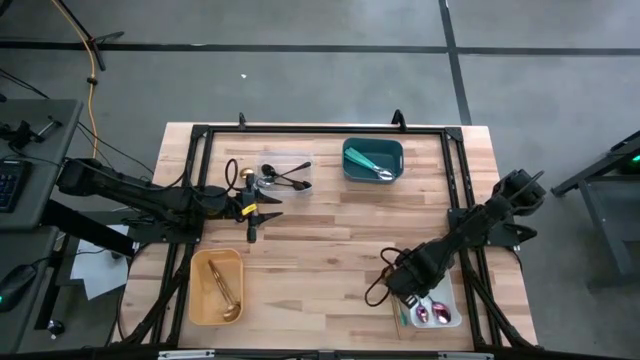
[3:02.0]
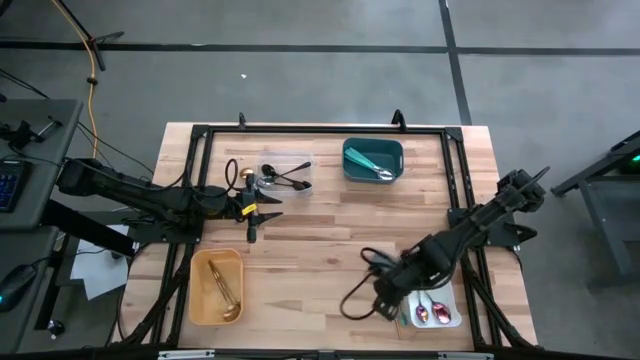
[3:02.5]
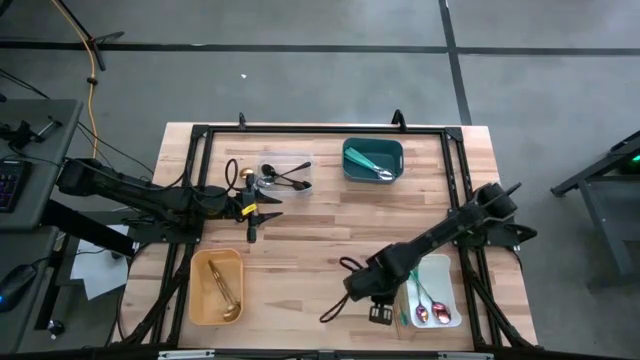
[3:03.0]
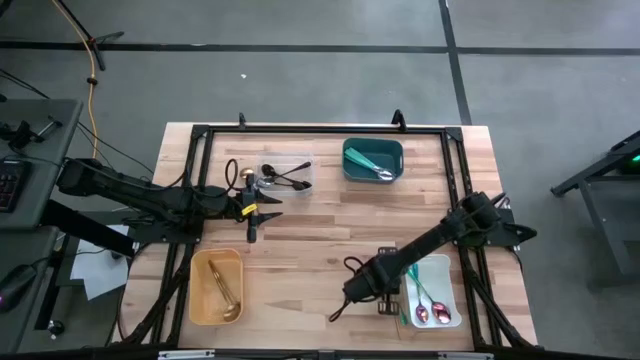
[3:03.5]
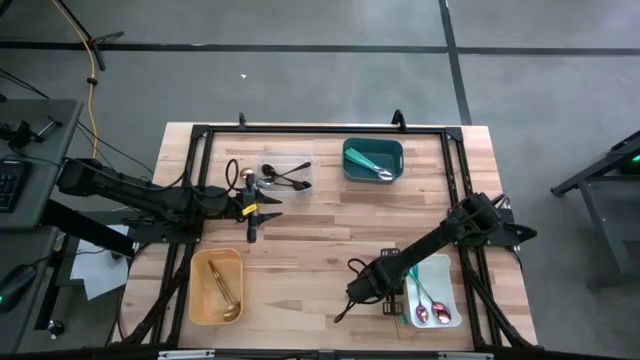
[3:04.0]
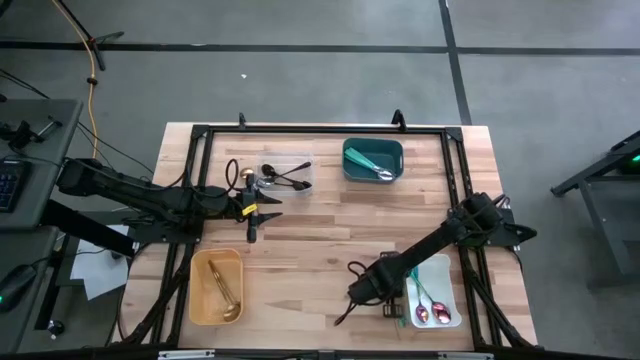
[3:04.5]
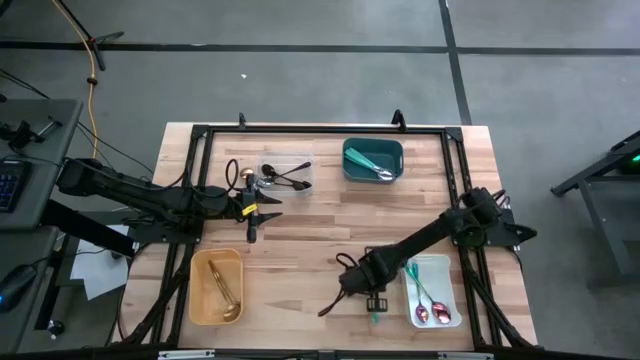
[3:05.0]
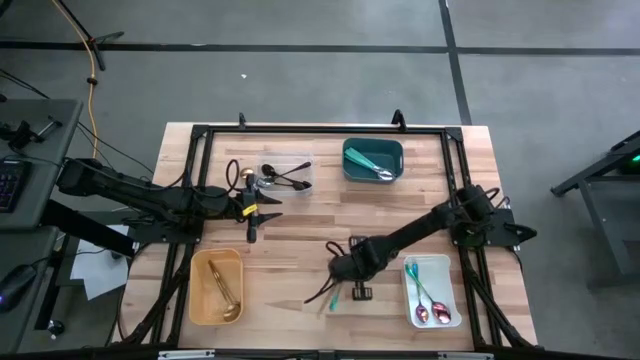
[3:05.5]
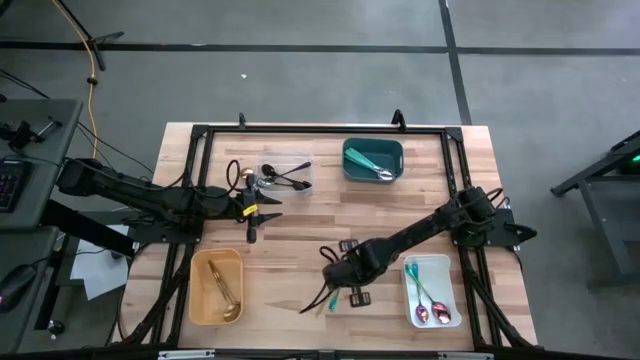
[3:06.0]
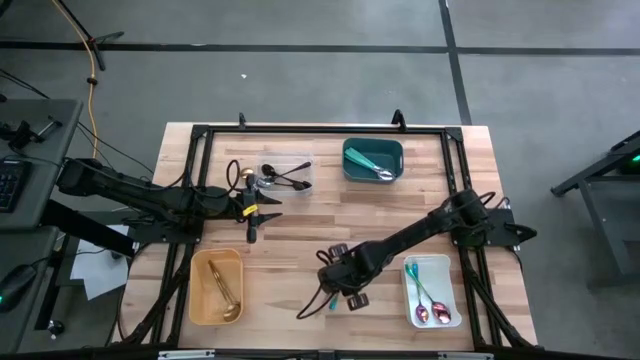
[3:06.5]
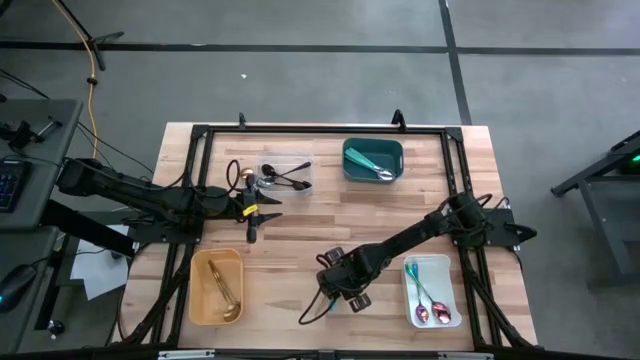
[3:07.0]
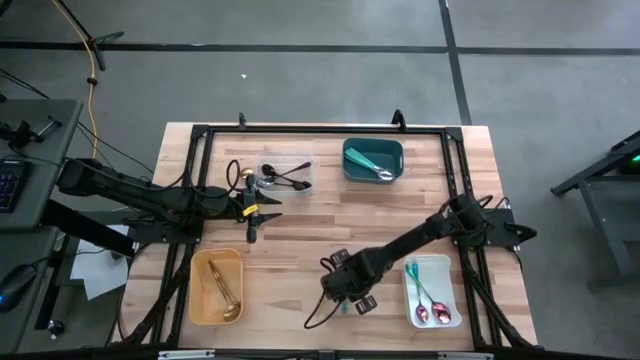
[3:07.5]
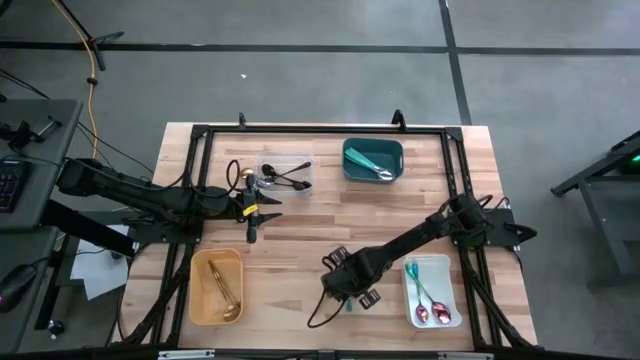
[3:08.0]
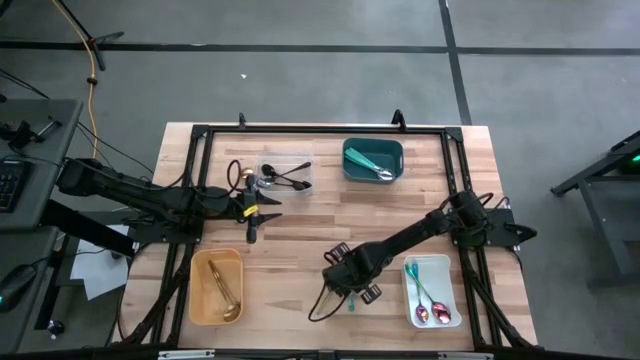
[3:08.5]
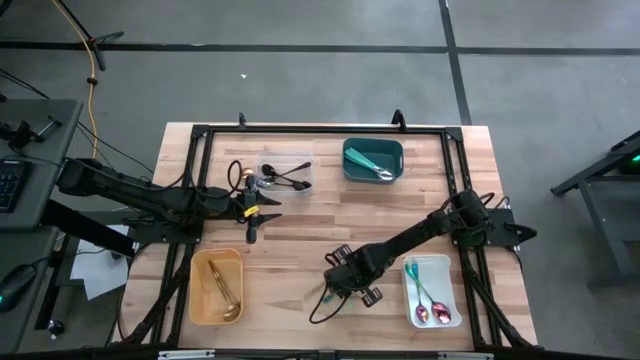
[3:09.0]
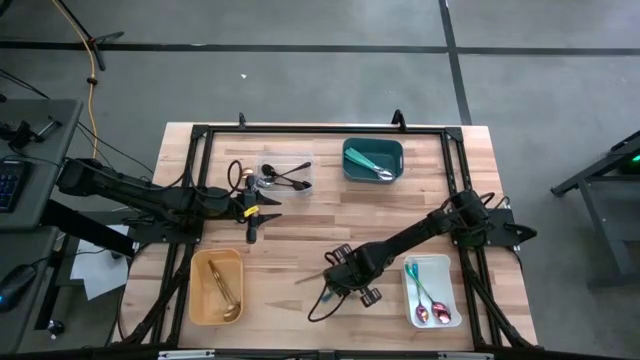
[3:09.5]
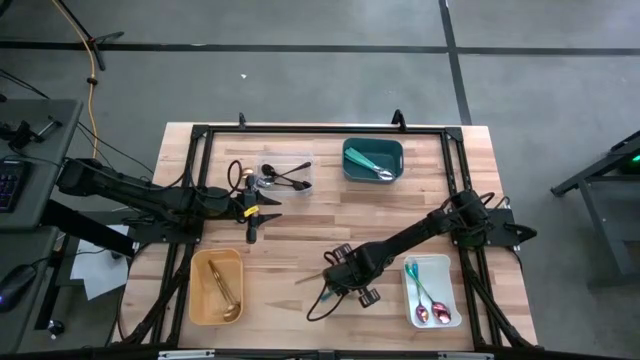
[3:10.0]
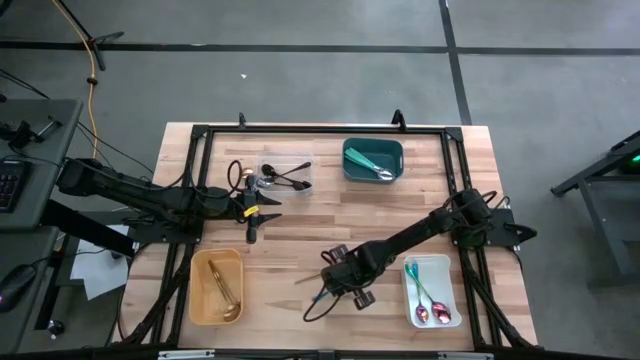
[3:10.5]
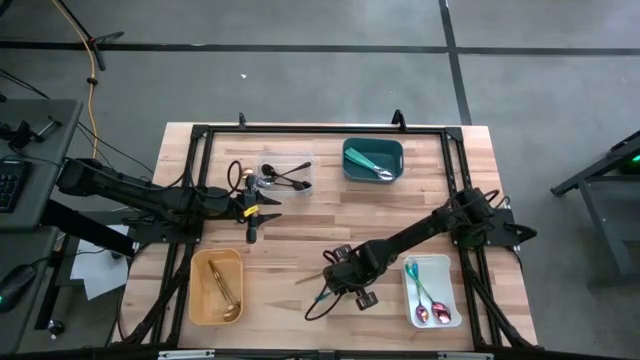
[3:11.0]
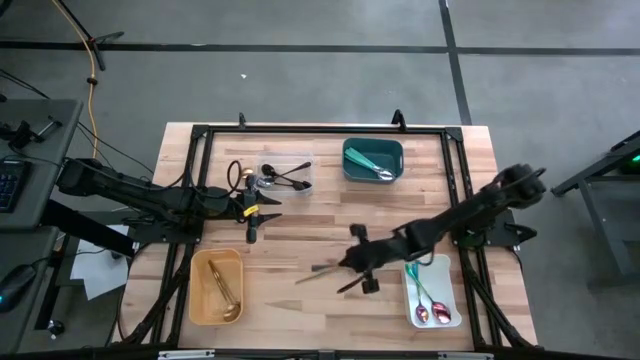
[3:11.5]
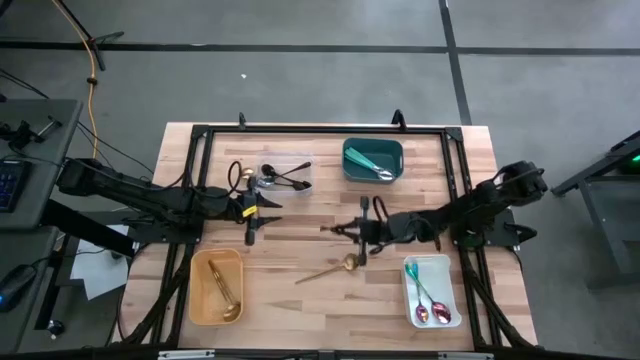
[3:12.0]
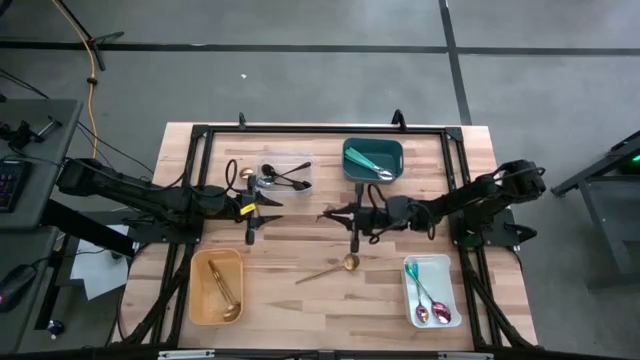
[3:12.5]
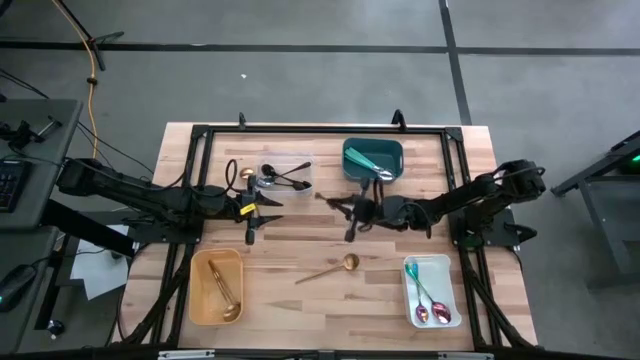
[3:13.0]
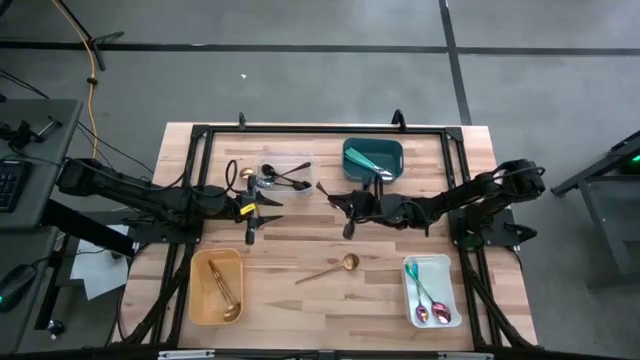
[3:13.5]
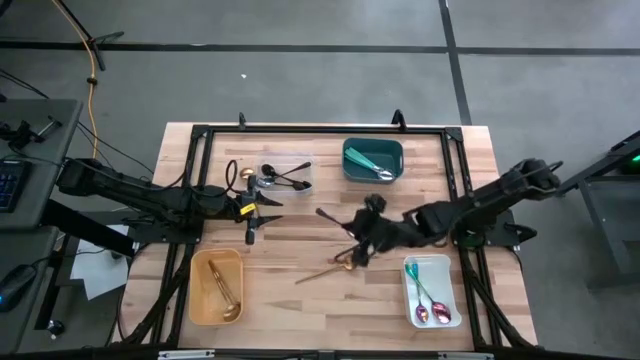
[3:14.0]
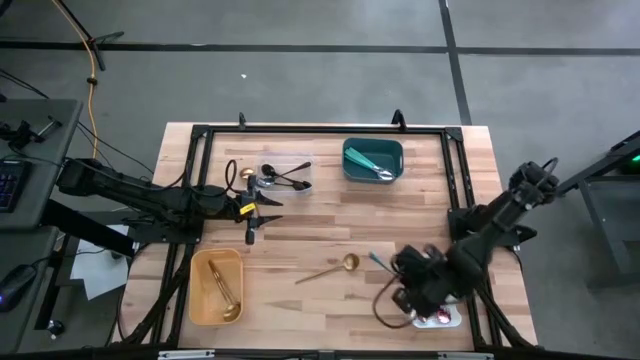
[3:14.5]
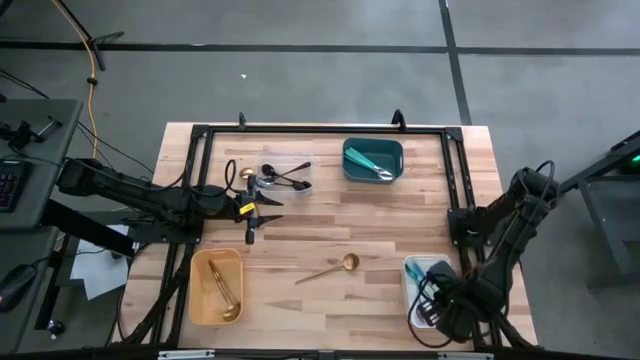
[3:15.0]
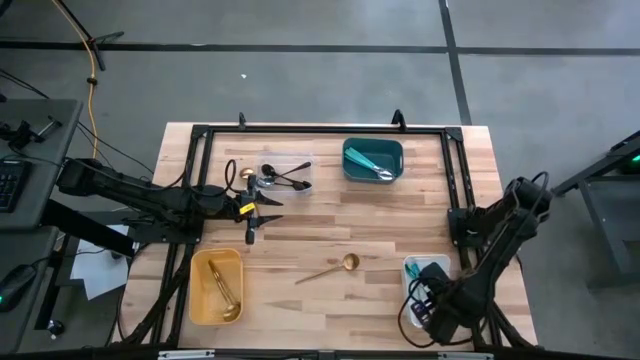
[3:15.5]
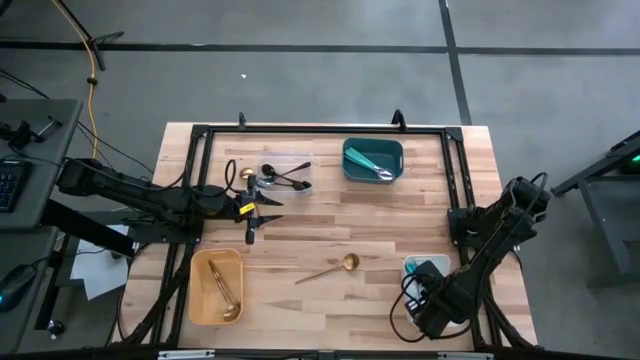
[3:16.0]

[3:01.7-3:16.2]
Task: Sort silverware by color (type)
Put the purple spoon into the white bin

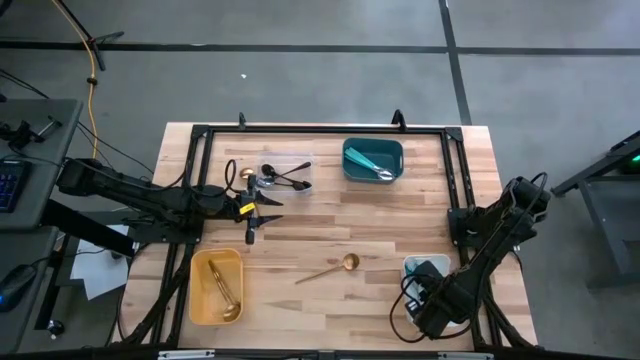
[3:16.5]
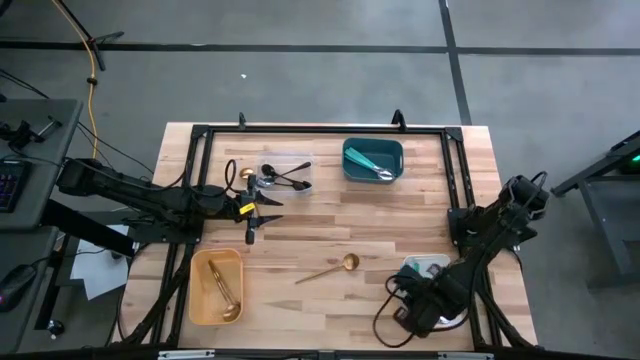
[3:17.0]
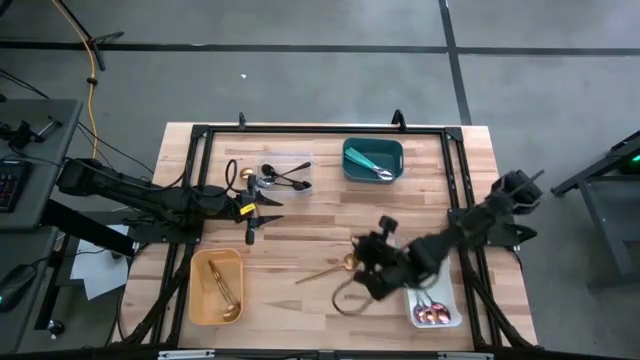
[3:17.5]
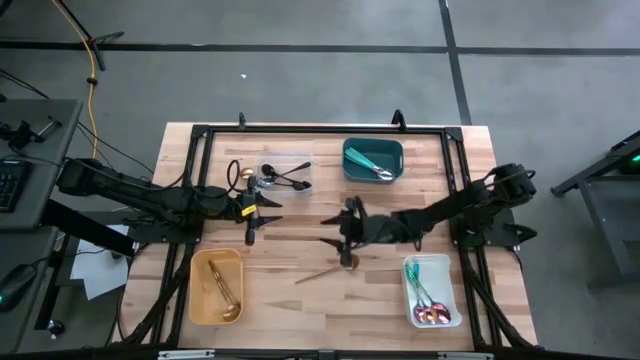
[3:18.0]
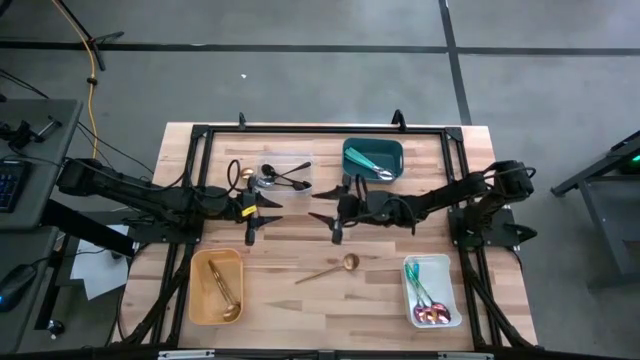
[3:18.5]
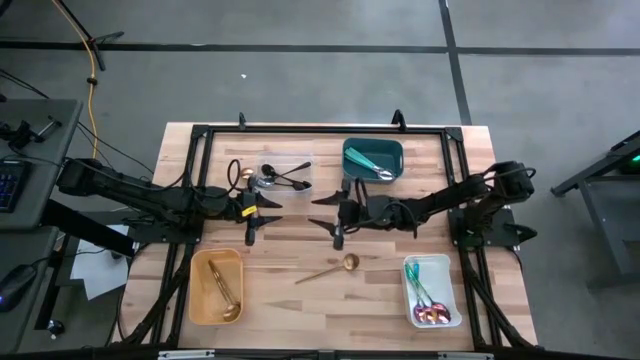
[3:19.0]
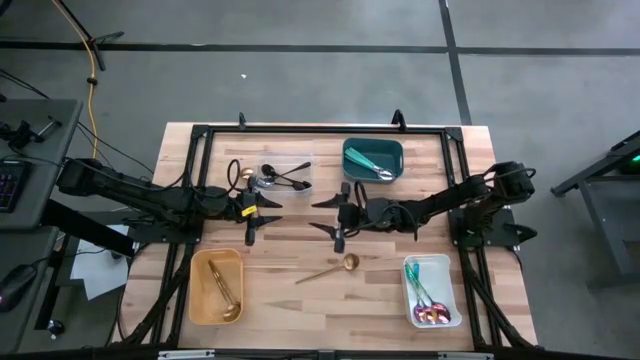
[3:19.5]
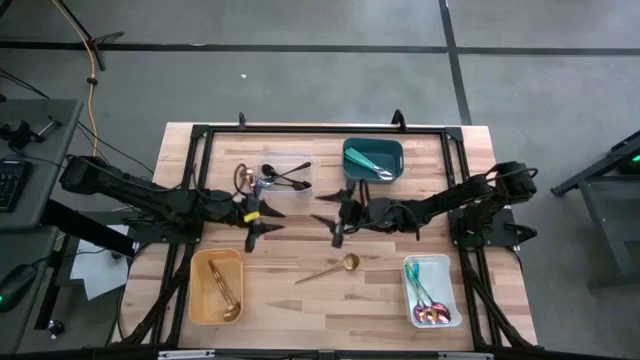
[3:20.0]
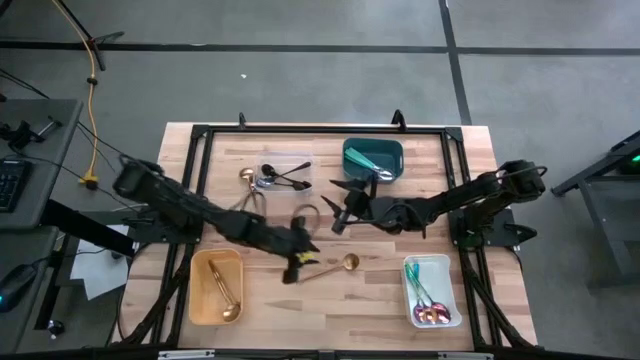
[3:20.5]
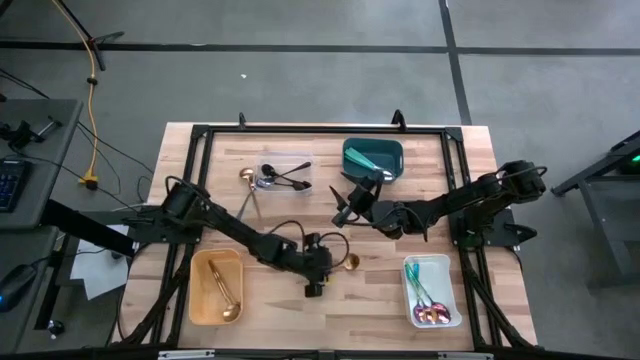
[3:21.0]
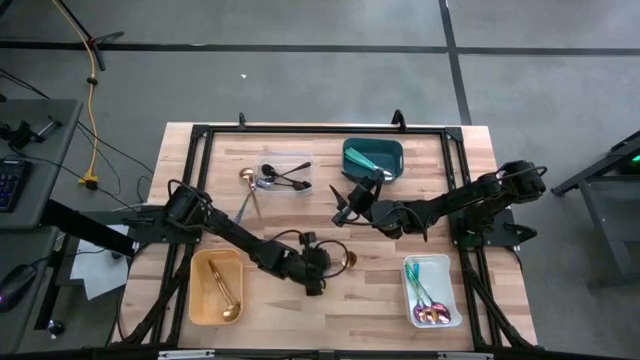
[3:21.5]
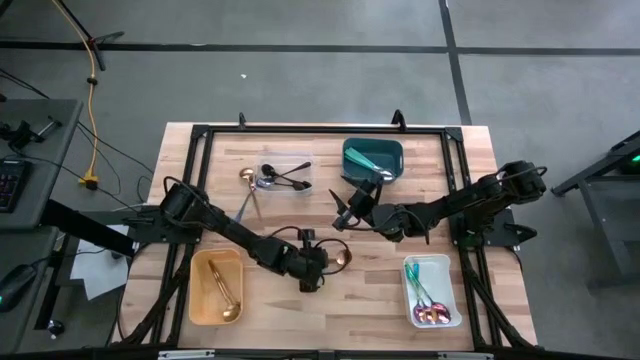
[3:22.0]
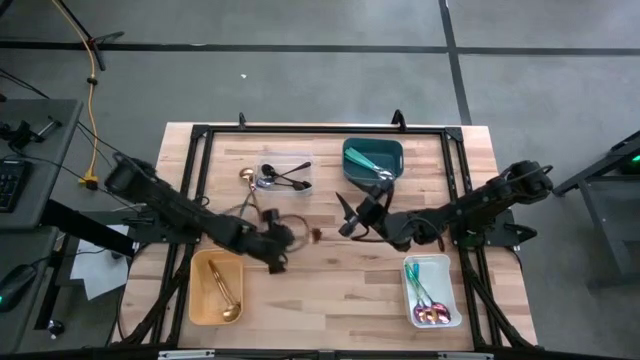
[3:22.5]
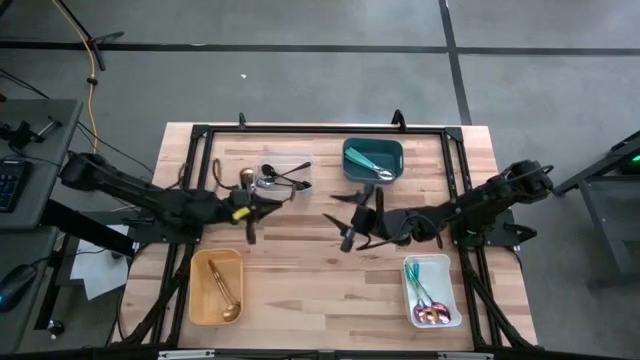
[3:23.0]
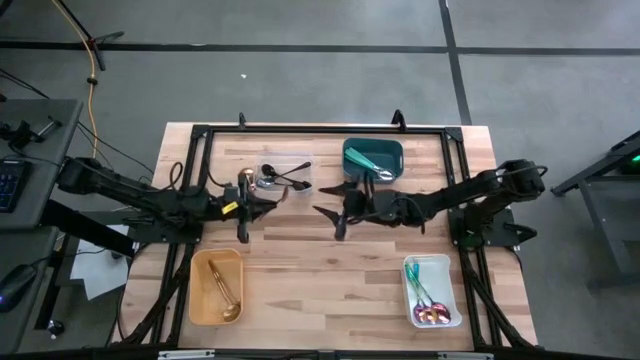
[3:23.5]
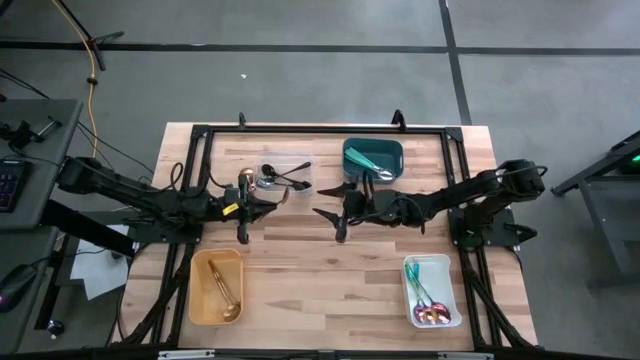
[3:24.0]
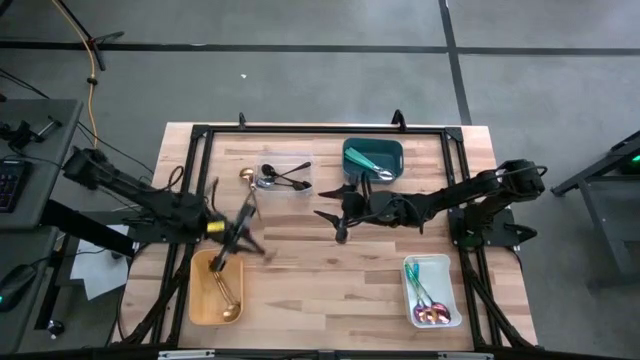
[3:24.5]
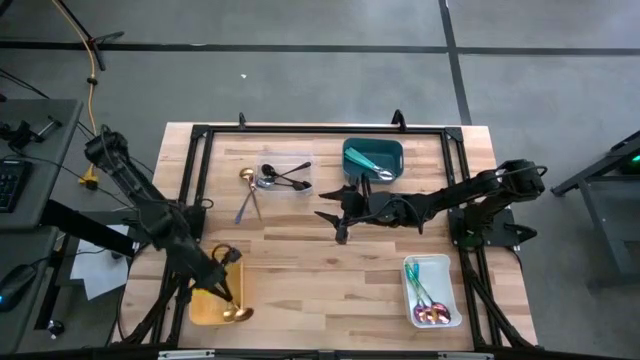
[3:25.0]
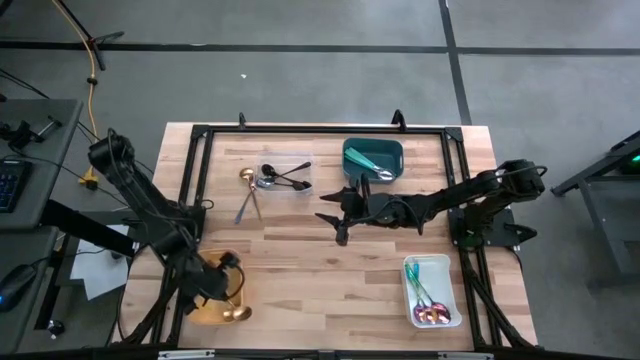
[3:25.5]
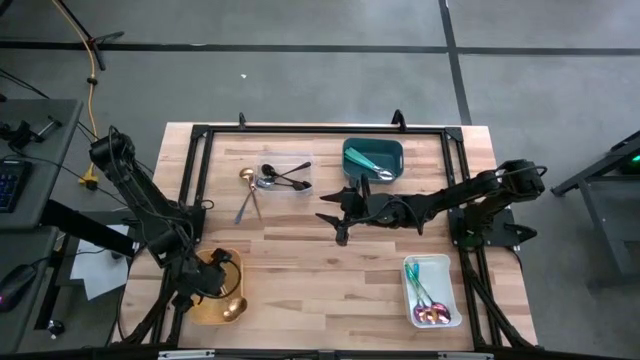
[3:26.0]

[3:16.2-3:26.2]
Put the gold spoon into the yellow bin
